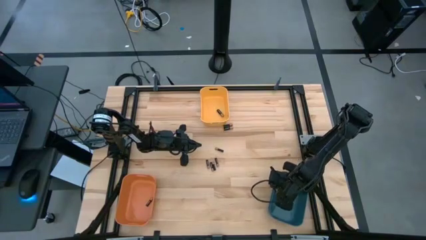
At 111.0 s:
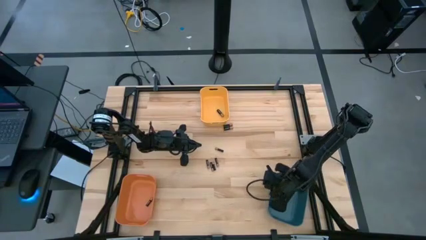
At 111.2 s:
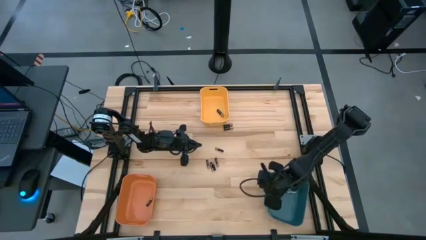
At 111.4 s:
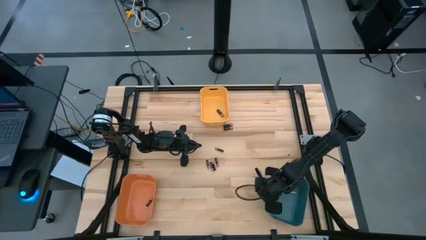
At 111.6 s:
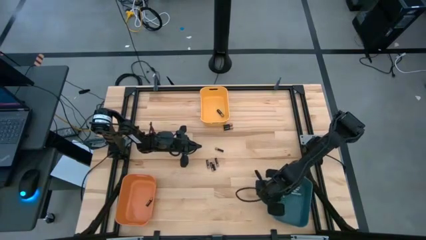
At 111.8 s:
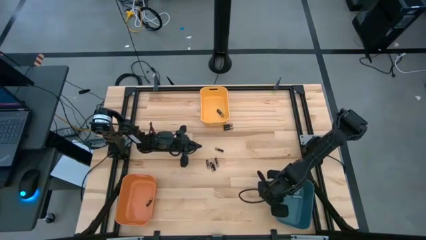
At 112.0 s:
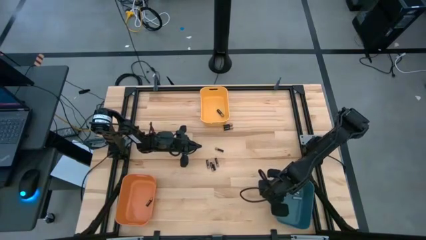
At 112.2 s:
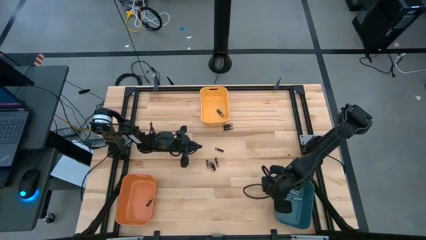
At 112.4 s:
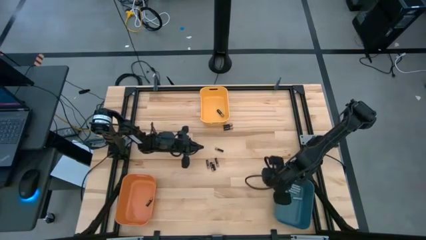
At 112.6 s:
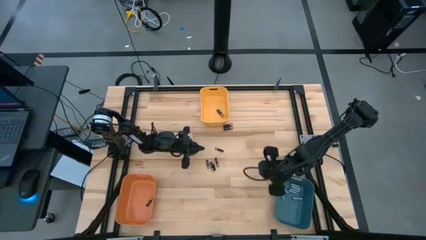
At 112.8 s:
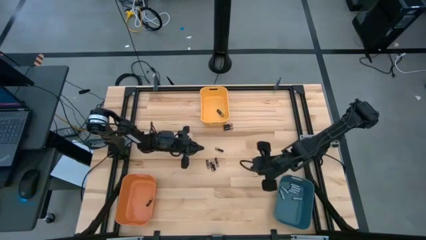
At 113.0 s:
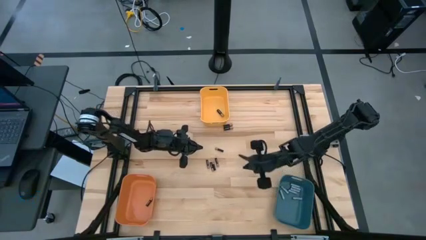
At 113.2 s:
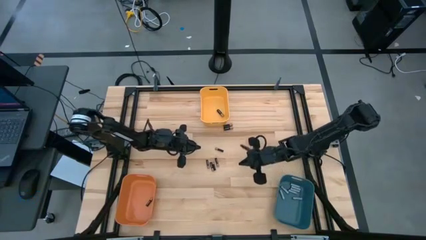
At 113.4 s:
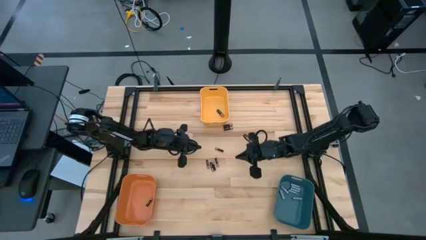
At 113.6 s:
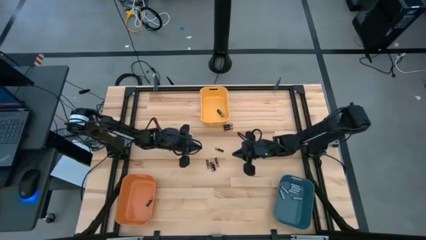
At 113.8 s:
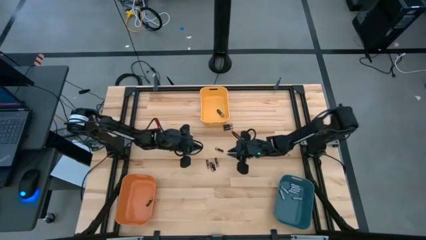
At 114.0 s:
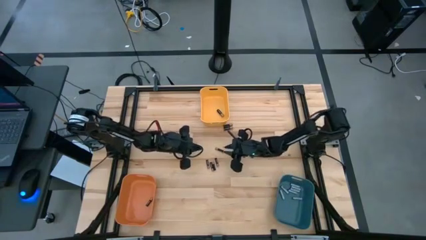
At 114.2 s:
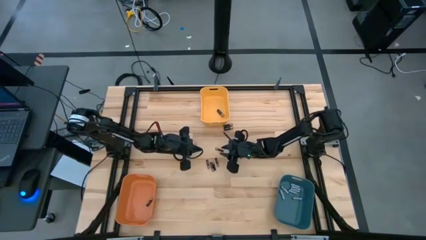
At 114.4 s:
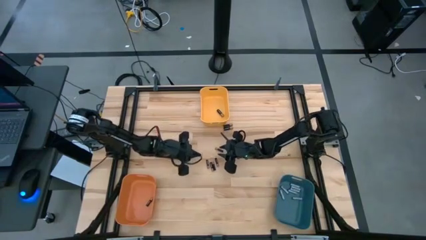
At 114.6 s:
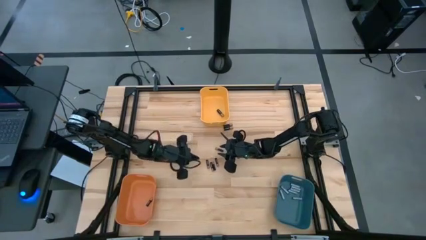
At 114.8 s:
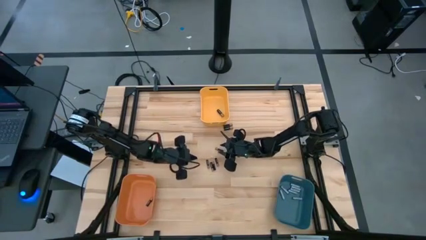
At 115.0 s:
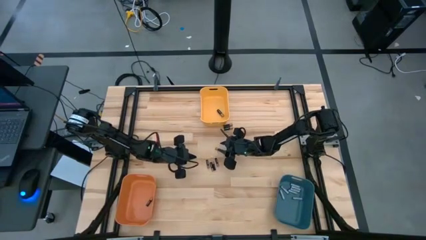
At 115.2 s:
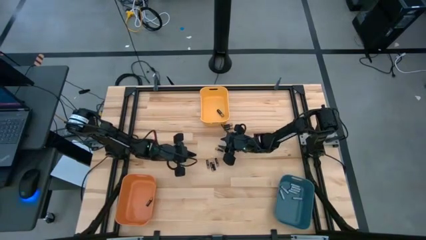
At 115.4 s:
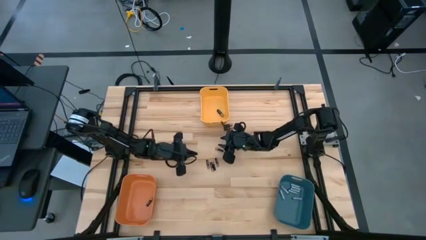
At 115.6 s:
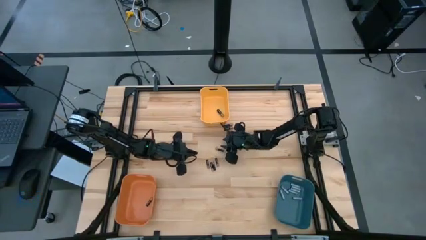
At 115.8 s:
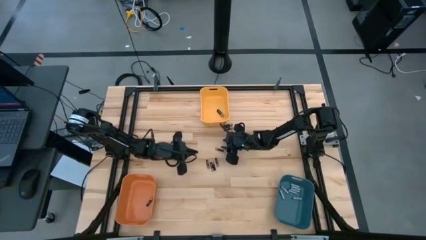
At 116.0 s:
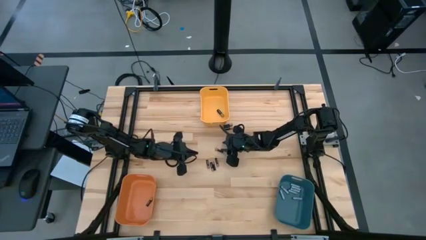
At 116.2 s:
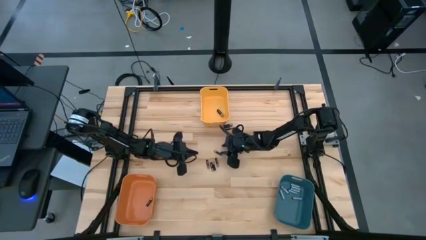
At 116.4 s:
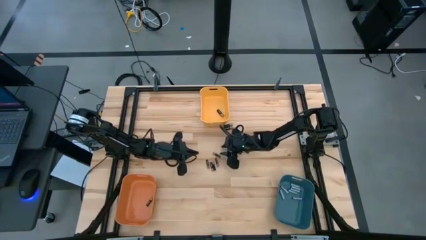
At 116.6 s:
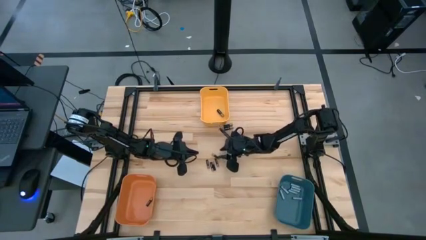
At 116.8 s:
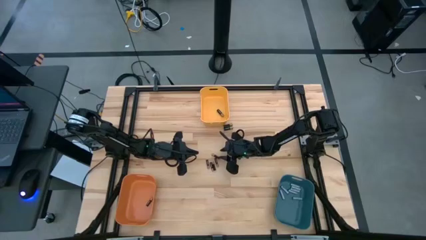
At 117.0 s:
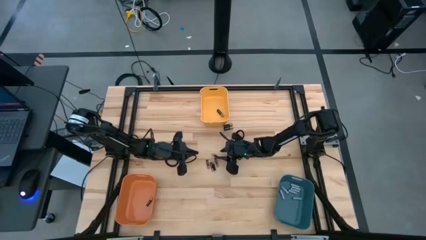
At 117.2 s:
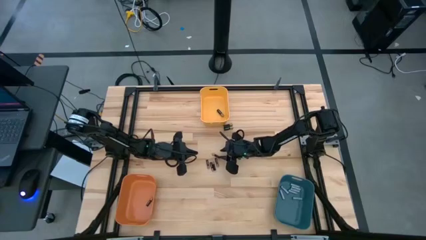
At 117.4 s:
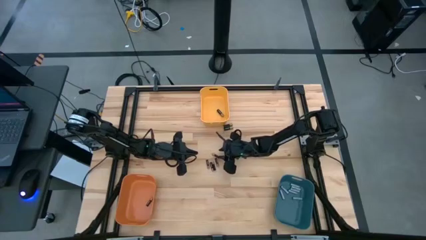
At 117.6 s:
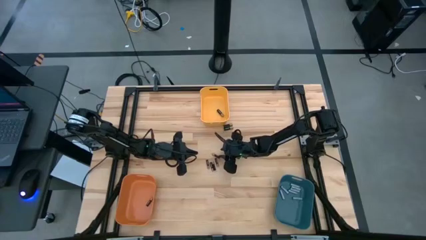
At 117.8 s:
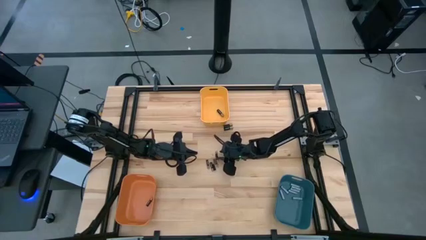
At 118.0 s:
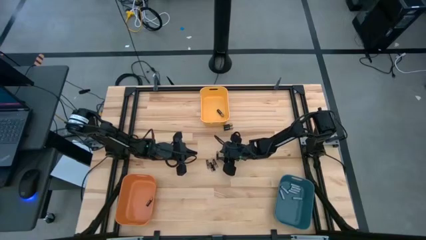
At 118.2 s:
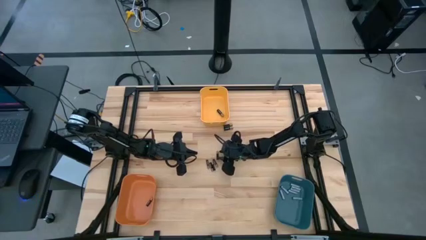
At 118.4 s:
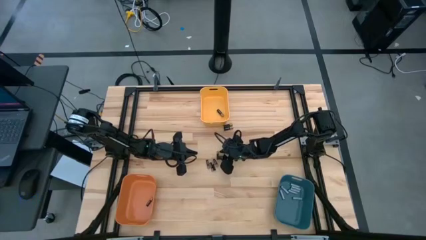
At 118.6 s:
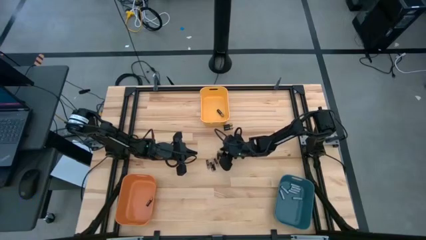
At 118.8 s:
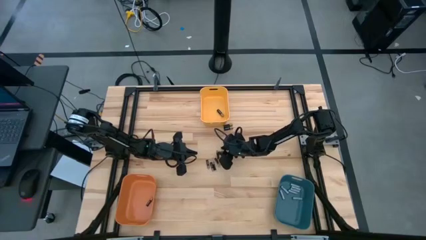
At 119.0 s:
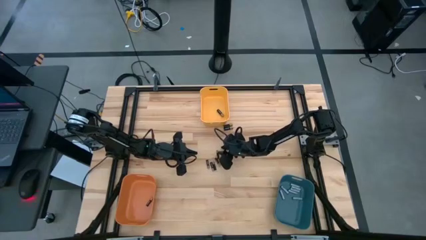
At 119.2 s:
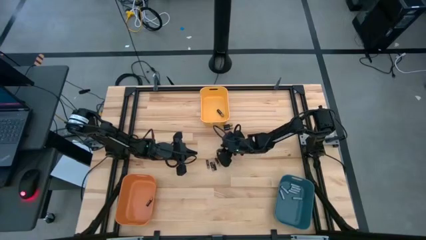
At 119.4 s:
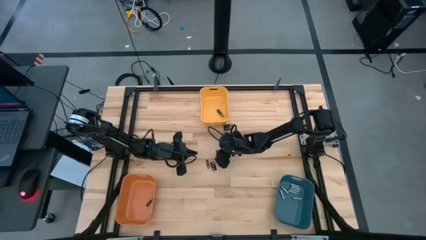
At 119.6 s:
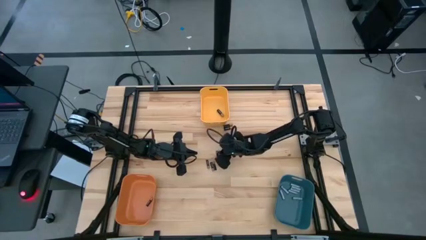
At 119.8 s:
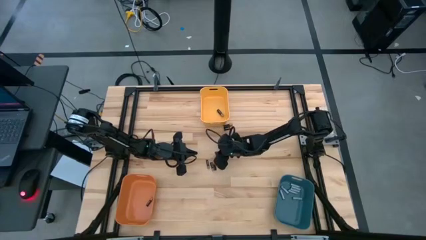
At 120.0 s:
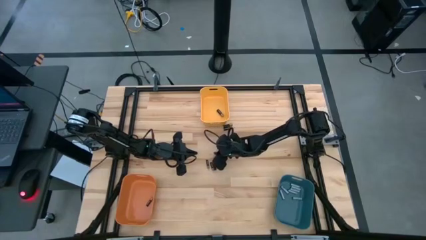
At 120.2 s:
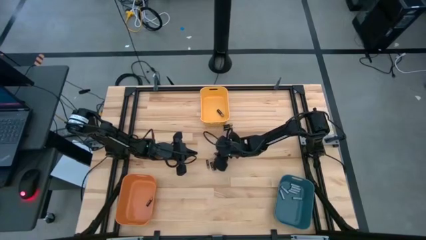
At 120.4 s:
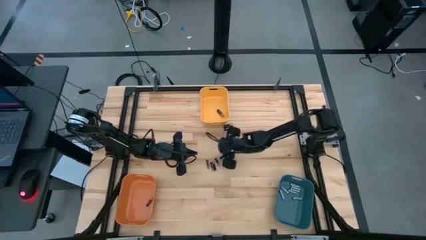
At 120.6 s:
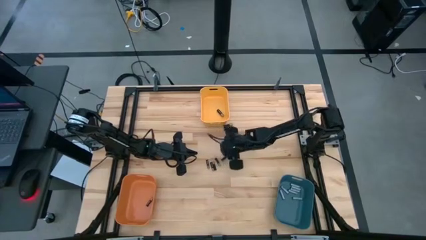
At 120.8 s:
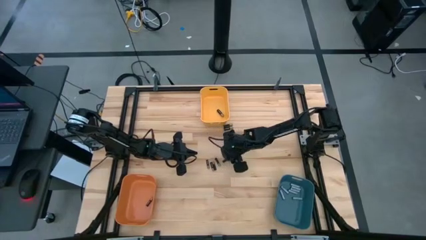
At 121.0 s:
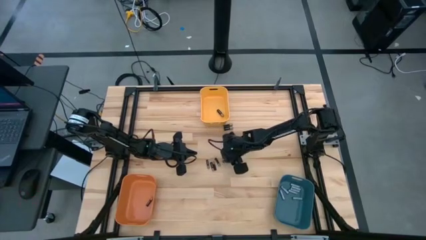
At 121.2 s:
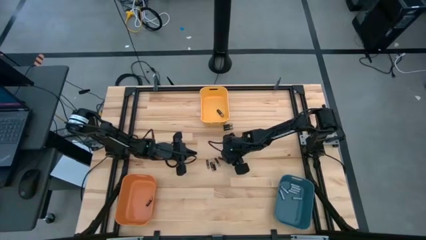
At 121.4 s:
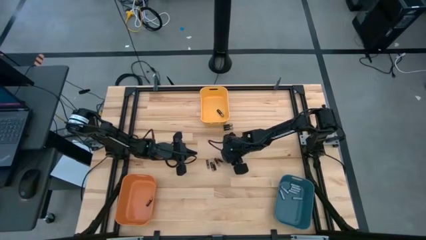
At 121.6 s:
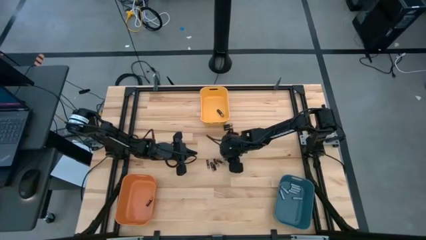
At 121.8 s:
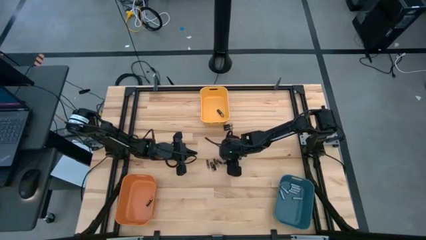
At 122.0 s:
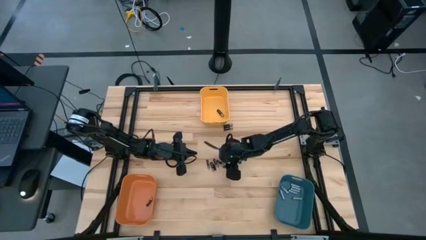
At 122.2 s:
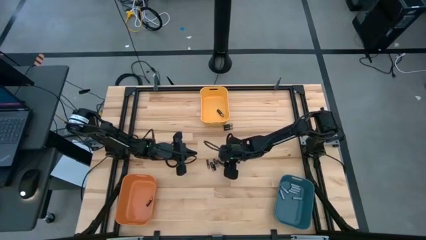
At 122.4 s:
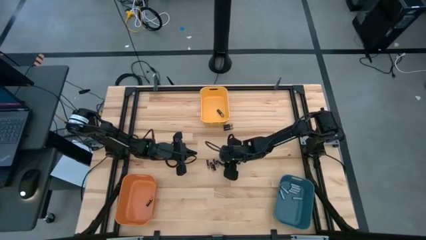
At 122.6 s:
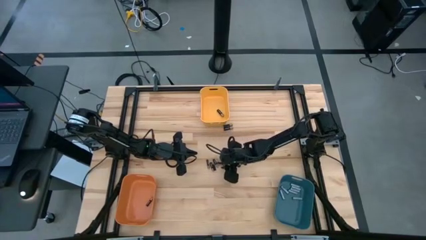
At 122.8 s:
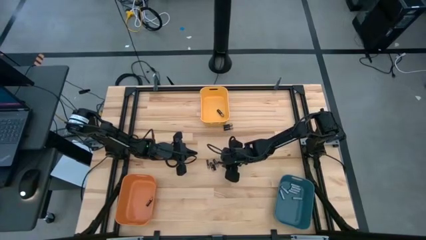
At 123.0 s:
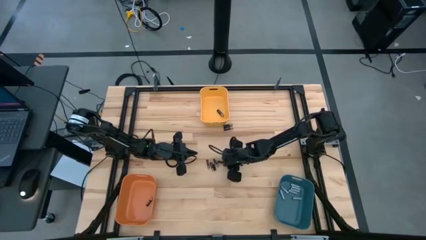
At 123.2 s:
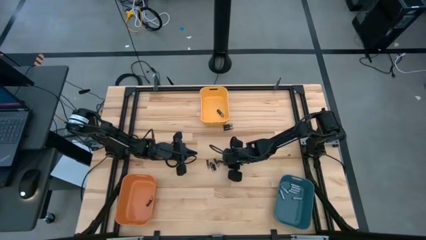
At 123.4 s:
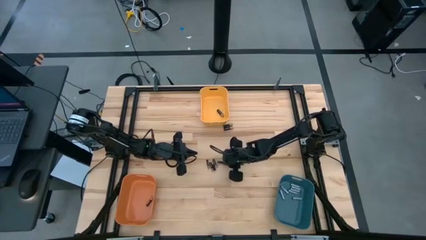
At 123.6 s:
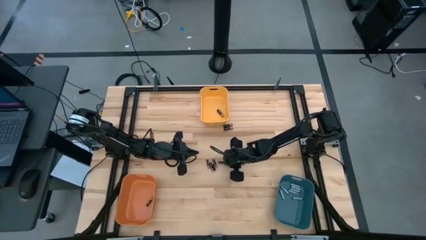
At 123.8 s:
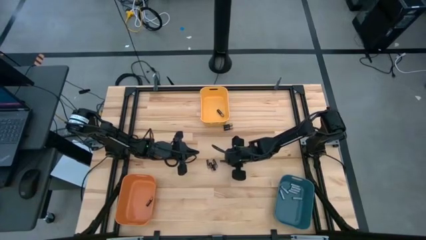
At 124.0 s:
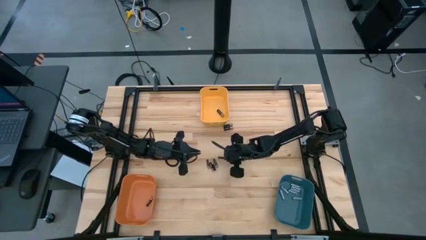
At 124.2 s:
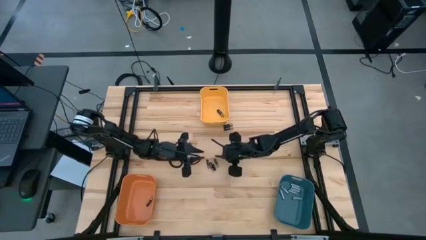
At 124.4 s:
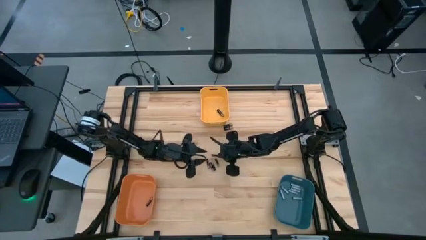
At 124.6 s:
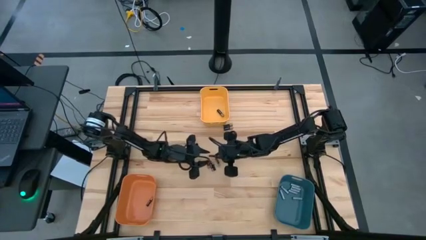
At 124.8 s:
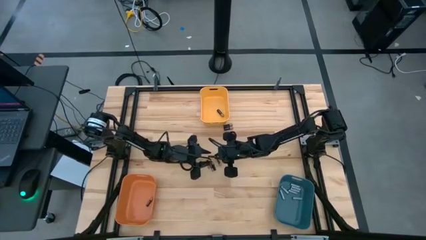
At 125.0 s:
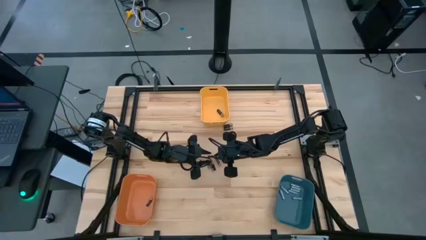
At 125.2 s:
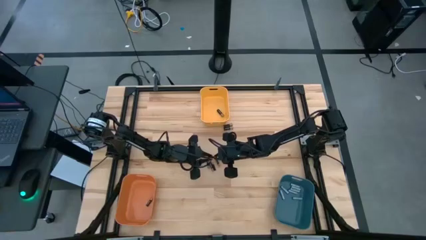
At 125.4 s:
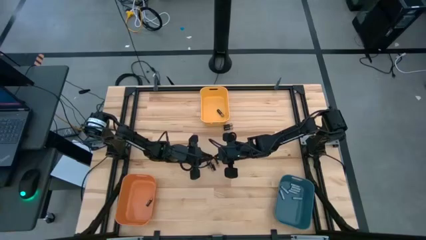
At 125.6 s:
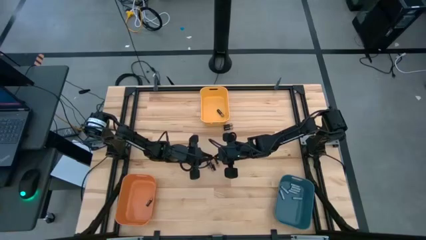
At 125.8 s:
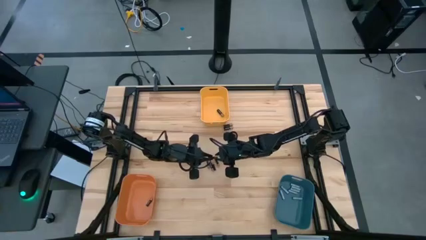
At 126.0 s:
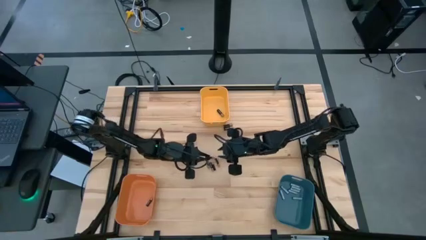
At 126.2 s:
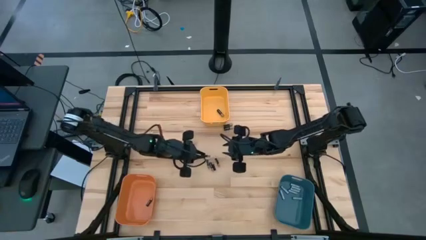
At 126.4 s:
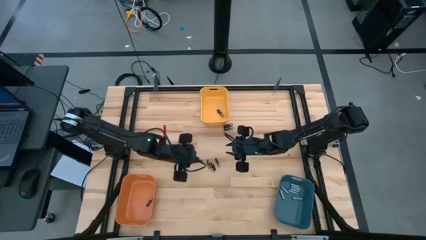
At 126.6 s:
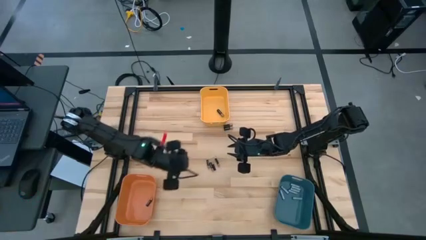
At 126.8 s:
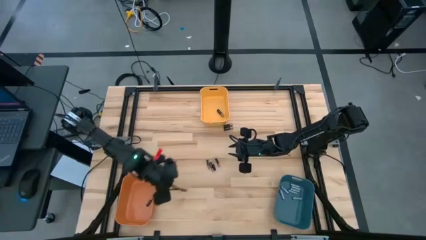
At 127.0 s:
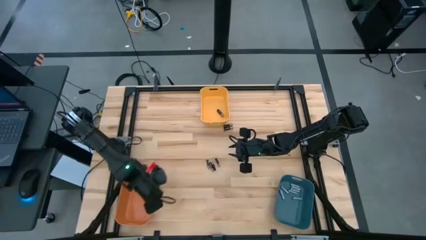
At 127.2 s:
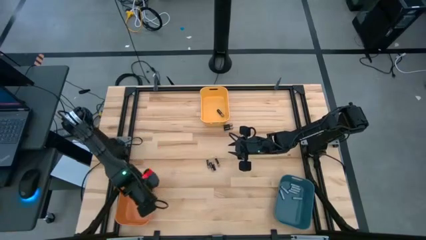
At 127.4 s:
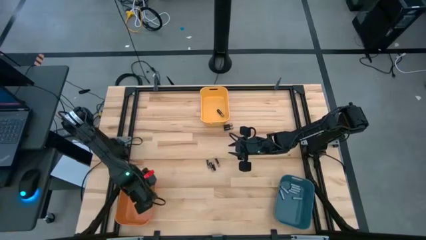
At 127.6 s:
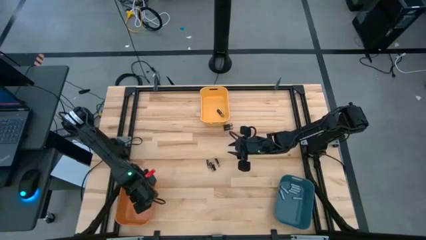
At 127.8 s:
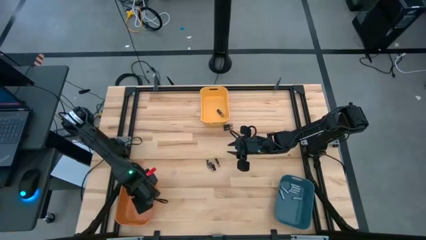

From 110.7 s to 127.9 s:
Task: Sort batteries
Put the small black battery into the orange bin
